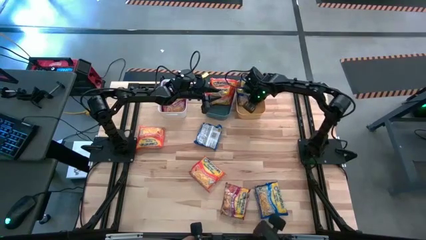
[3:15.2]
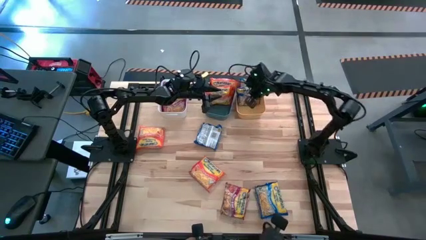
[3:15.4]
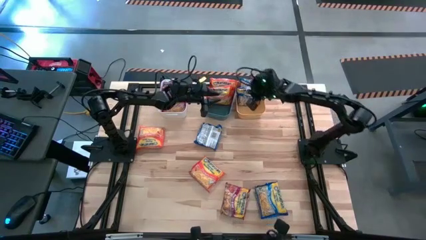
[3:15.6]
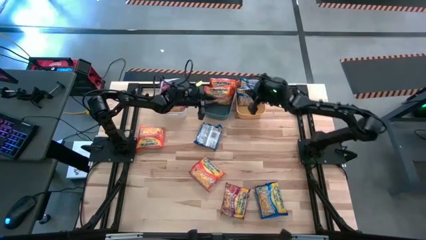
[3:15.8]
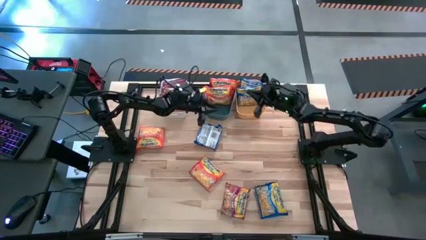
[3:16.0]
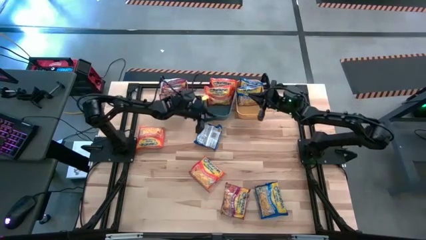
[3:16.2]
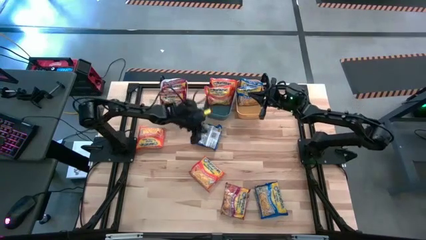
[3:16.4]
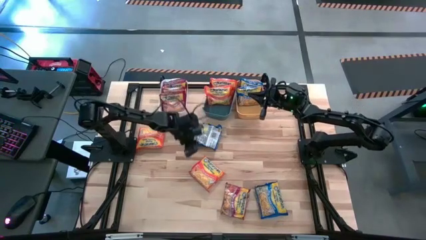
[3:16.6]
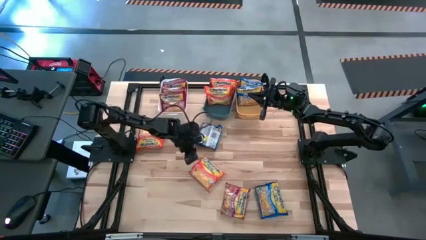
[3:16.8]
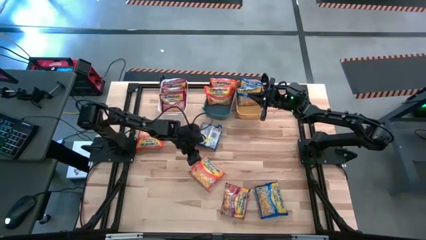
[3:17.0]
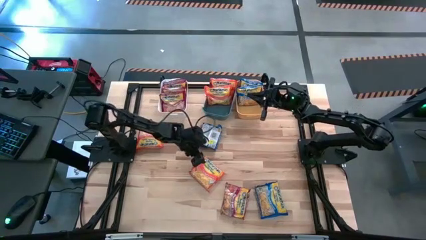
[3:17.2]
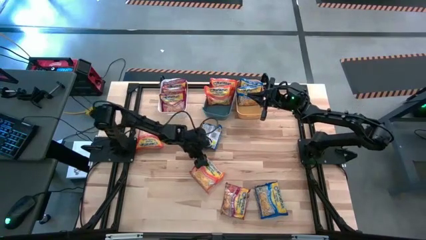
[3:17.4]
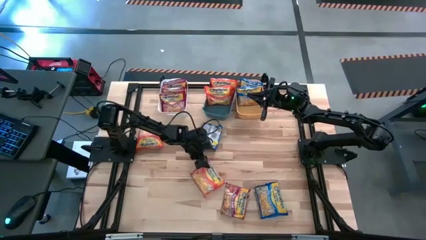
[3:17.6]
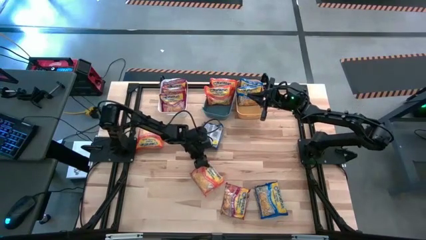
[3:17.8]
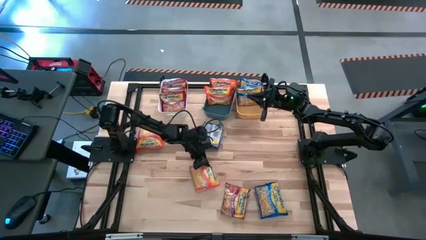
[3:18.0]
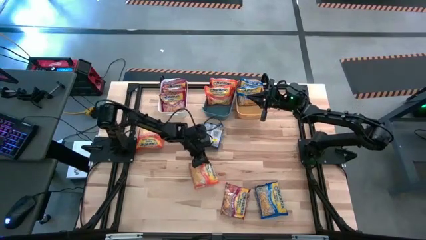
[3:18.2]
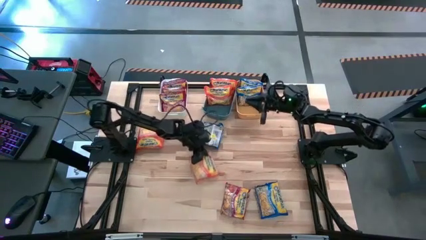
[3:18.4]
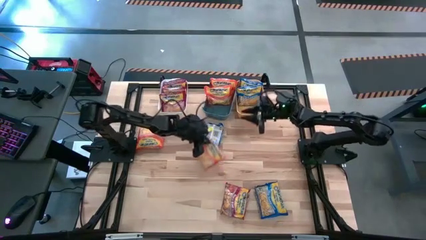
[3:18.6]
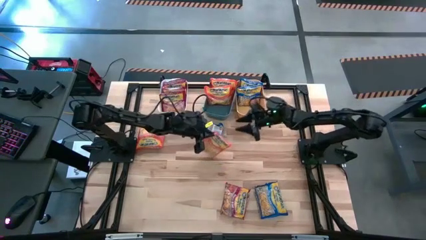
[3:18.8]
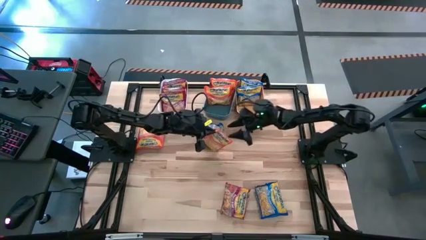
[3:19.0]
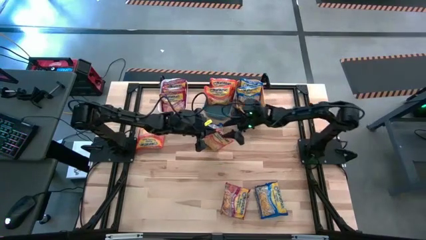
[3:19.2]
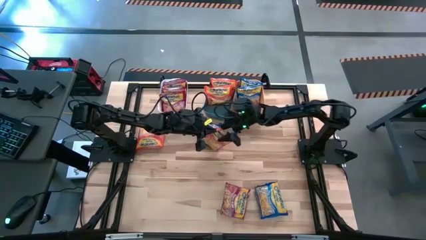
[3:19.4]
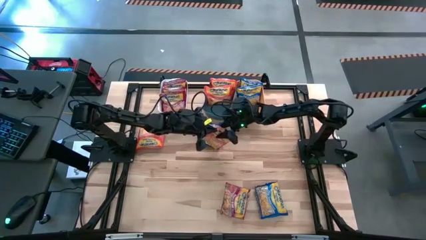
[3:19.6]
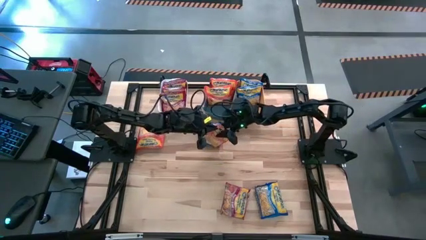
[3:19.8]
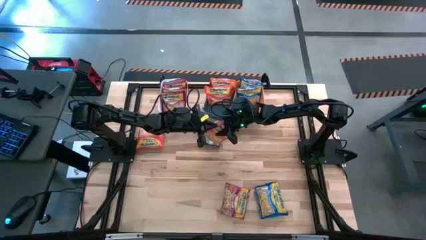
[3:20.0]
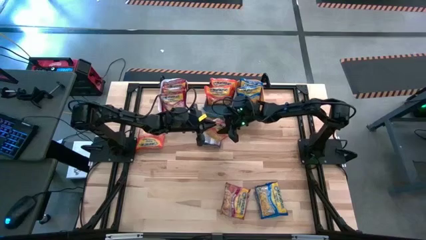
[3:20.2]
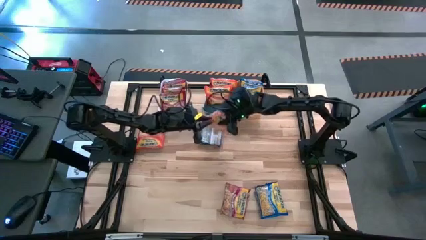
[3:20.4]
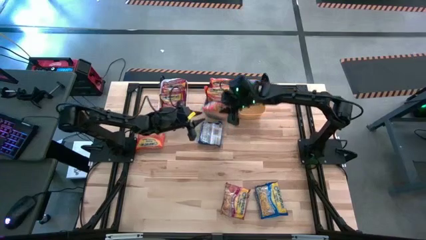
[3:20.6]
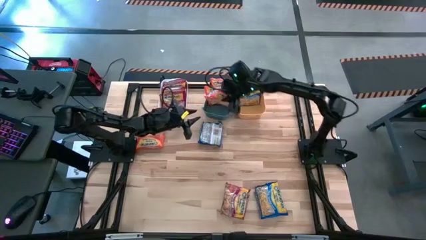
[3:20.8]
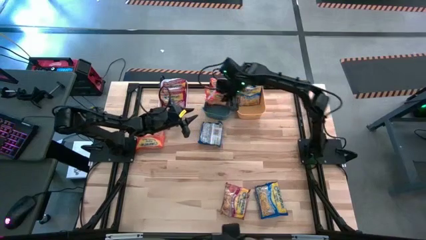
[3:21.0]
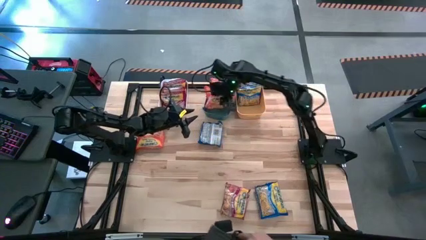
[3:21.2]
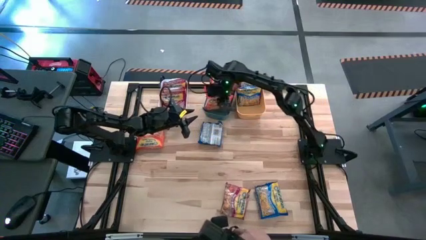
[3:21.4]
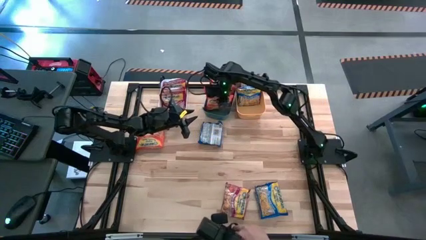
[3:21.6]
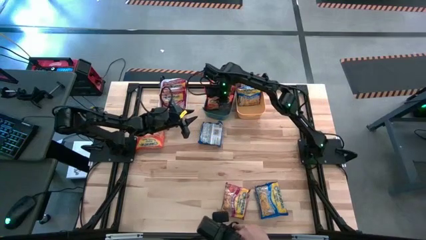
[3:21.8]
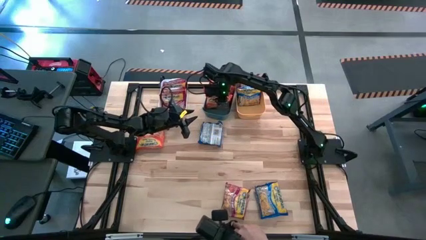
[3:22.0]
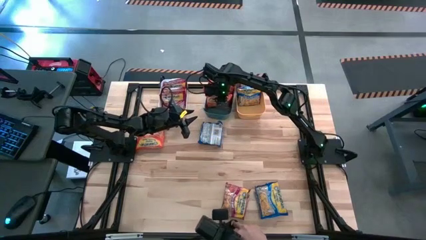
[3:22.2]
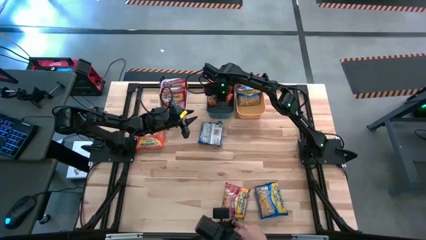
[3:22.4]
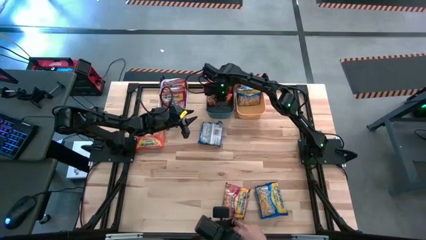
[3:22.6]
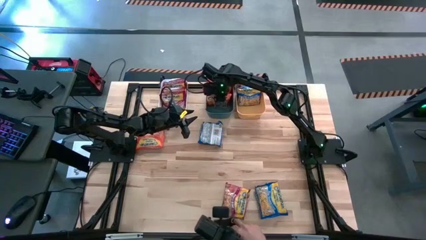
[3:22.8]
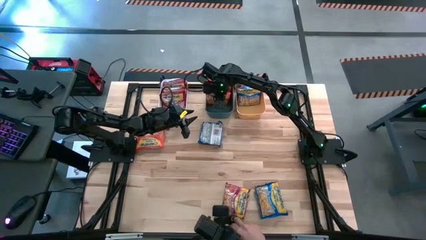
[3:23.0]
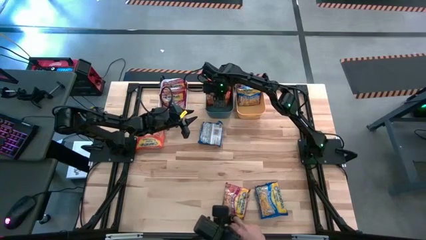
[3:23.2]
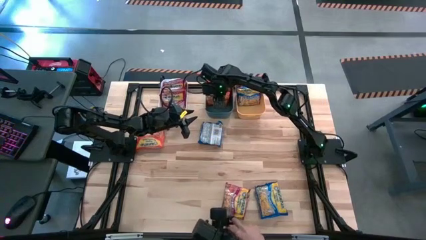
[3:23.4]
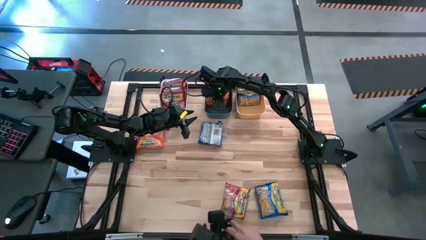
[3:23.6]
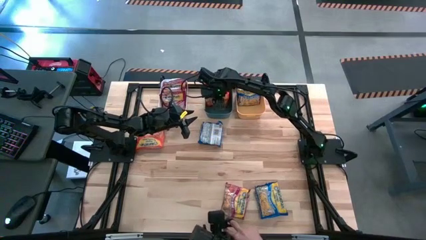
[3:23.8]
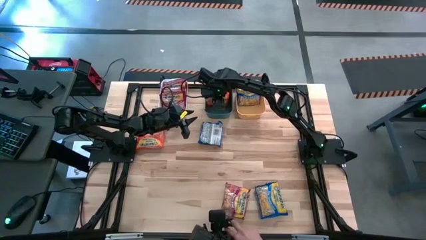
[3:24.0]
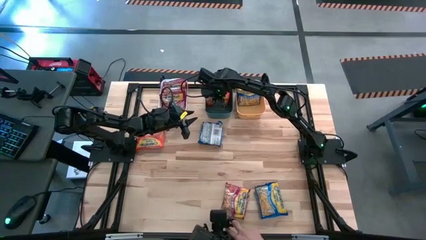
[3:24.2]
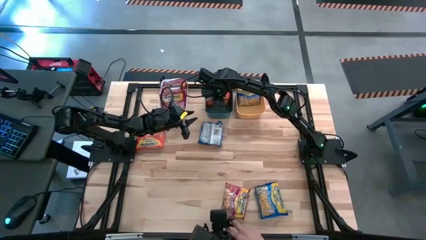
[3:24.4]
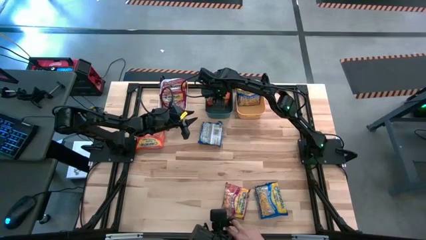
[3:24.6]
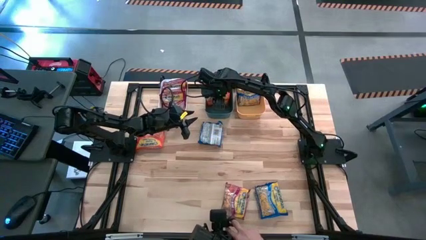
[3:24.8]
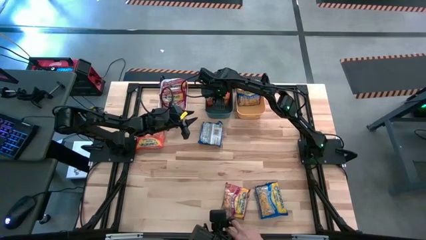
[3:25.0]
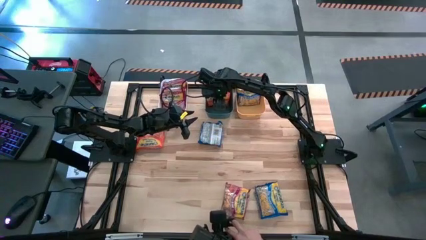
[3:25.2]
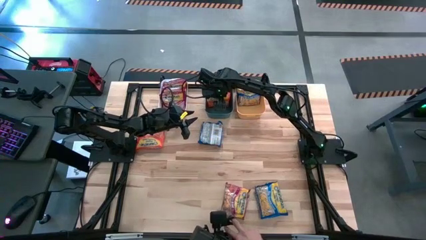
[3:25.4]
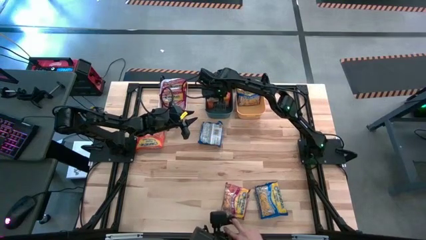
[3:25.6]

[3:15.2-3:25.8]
Task: Sort Maruchan noodles
Put the orange noodle pack into the blue bin

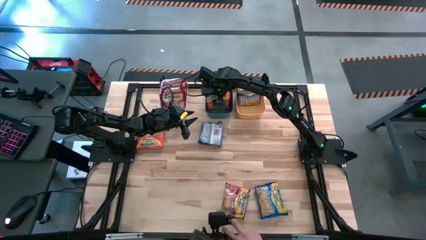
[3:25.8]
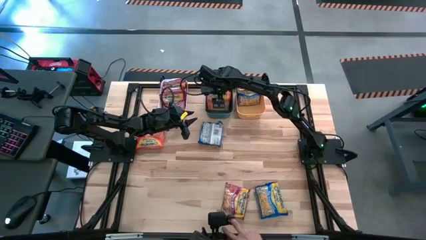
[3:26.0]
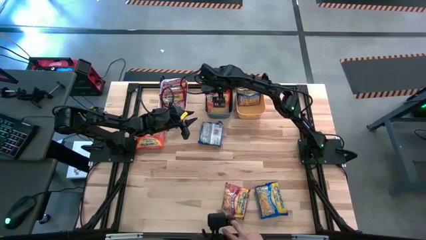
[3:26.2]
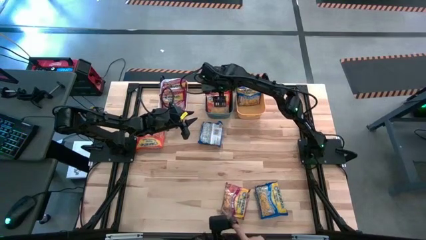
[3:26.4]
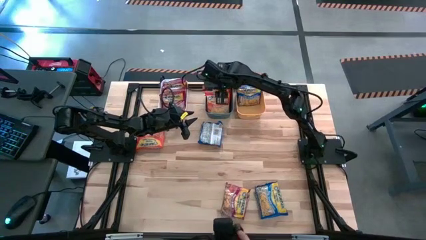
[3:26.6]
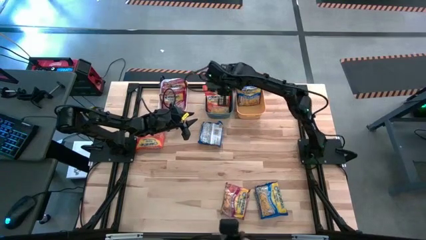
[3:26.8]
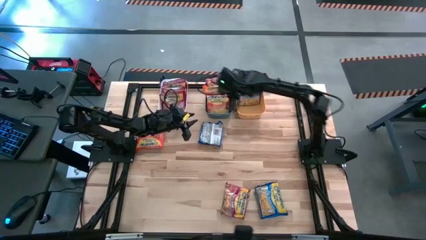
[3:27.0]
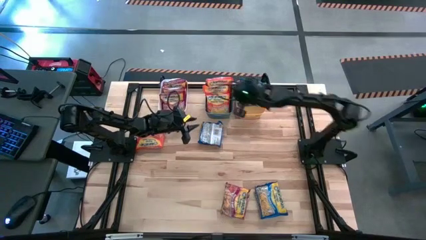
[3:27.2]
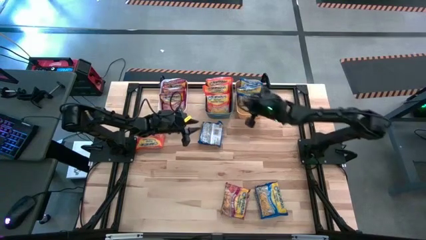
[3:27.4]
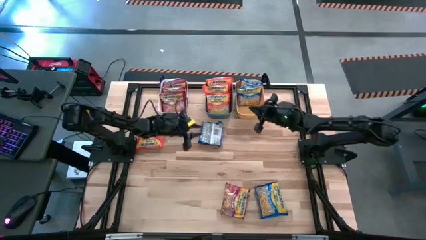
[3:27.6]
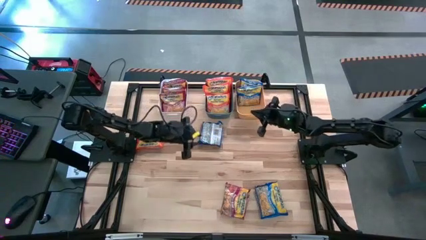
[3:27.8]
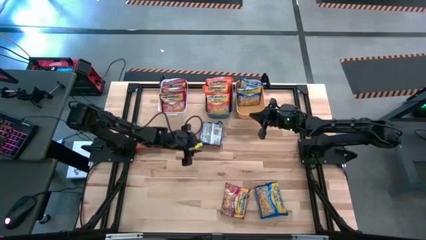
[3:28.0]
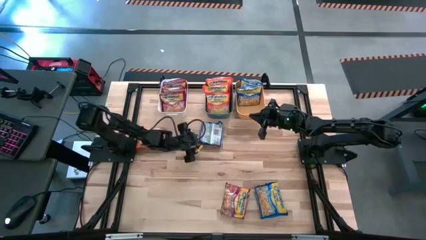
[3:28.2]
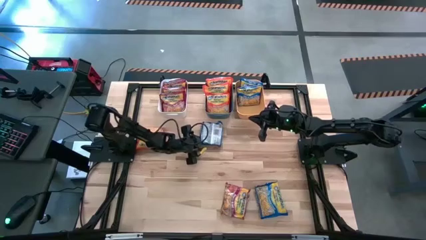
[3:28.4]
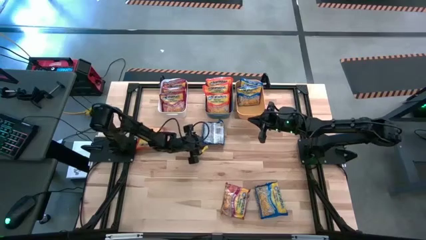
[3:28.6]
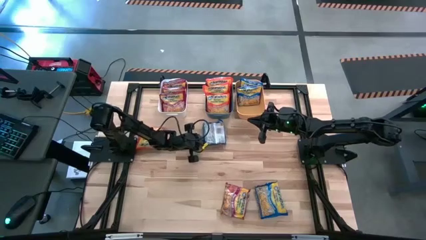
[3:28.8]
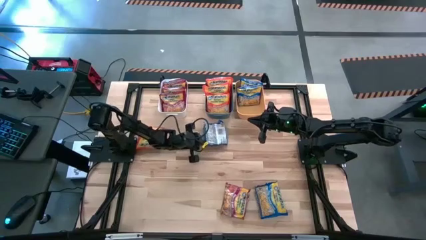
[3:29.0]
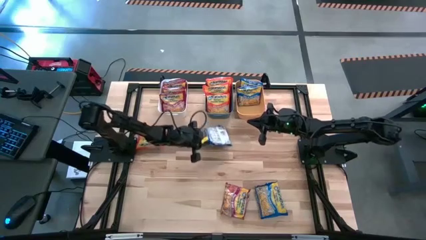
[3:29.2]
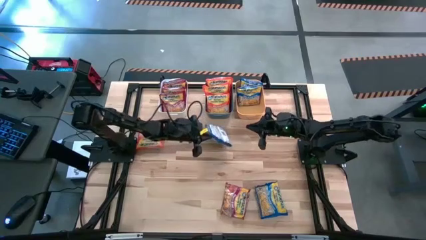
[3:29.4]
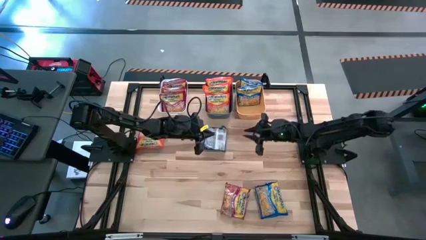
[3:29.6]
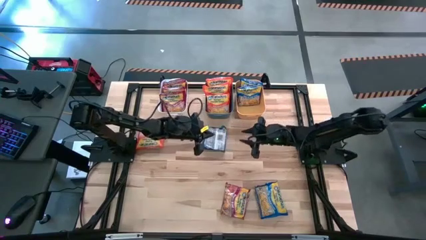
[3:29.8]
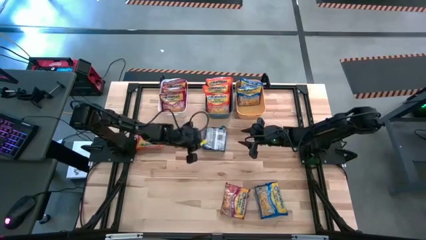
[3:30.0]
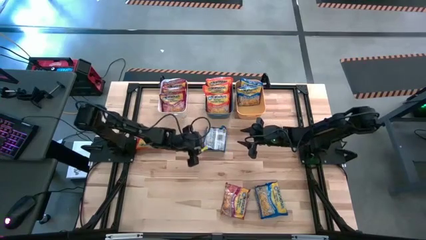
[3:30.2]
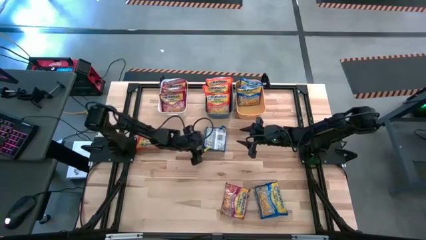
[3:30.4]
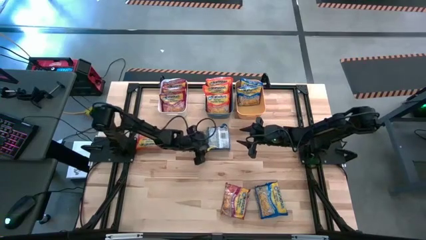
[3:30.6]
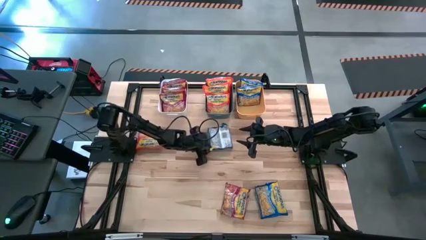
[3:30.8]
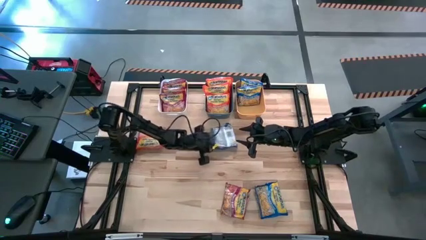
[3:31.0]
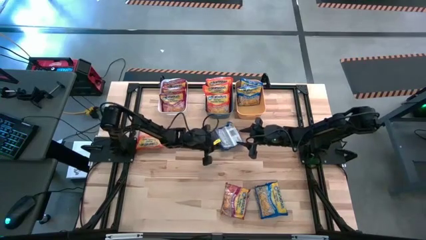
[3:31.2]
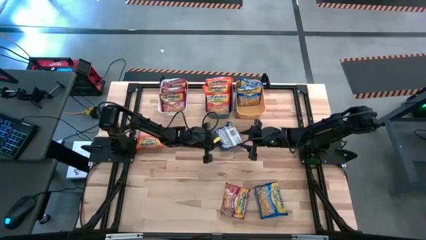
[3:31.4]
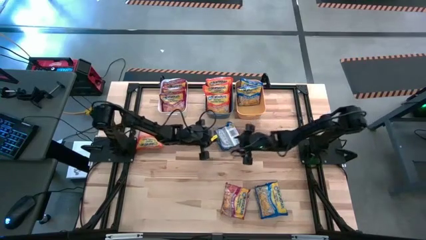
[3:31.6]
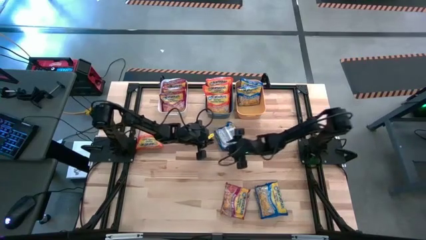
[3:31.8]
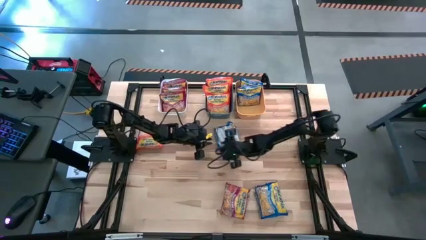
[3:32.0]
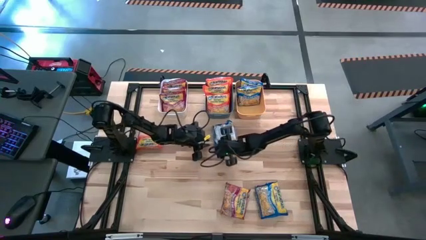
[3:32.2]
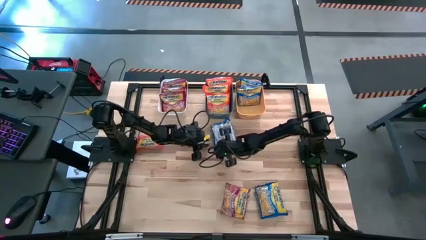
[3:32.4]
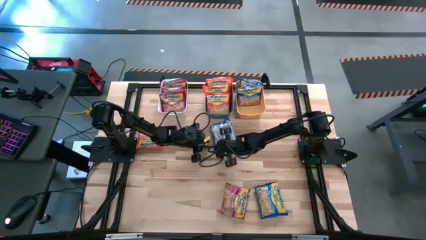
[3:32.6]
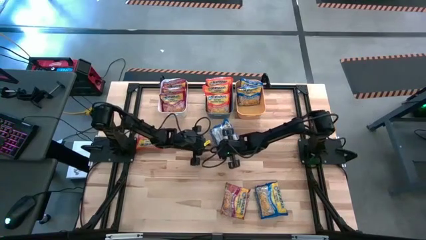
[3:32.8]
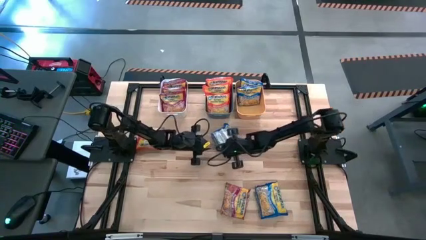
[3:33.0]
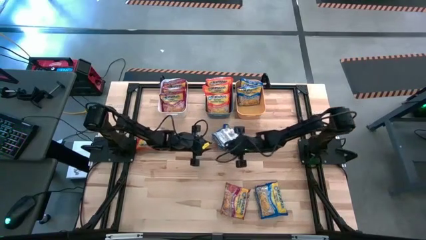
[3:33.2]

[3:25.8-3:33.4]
Put the blue noodle pack into the yellow bin
